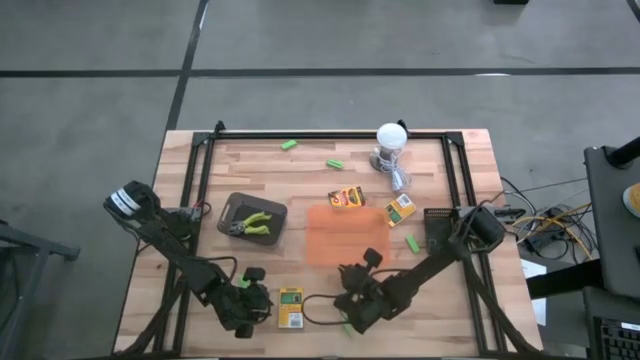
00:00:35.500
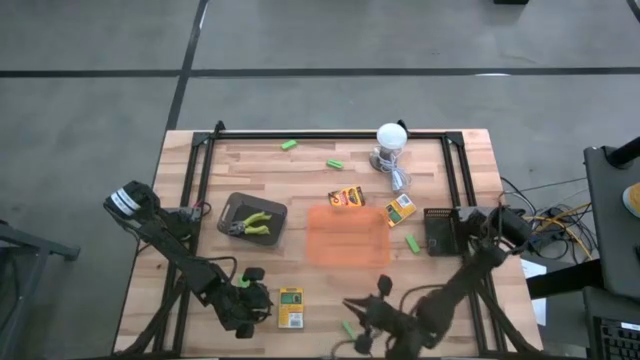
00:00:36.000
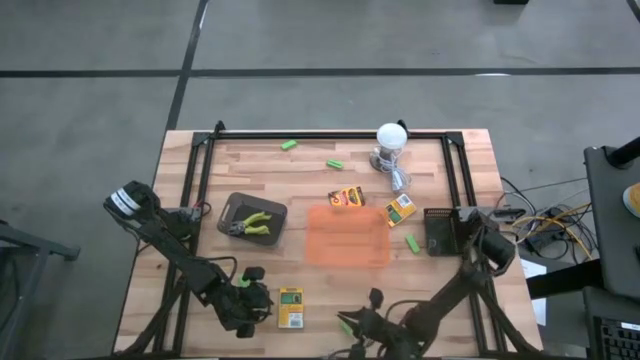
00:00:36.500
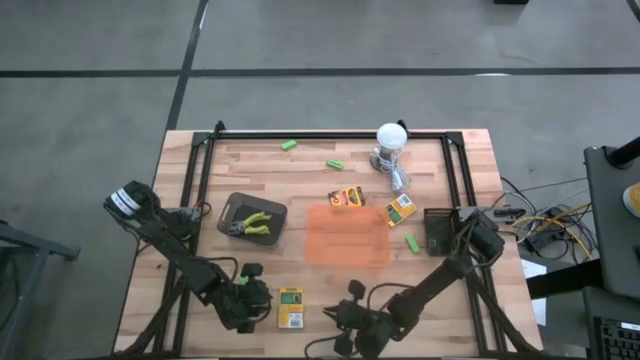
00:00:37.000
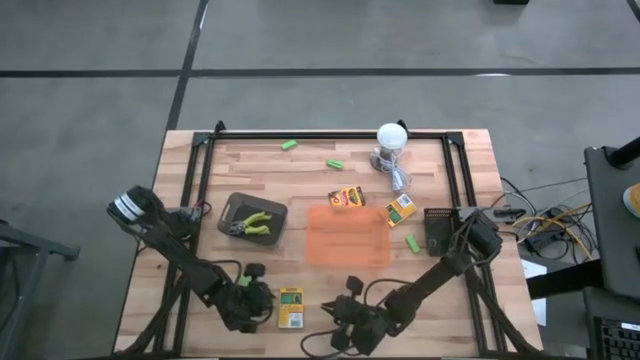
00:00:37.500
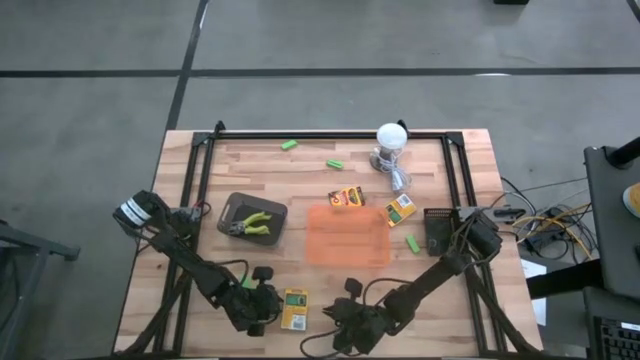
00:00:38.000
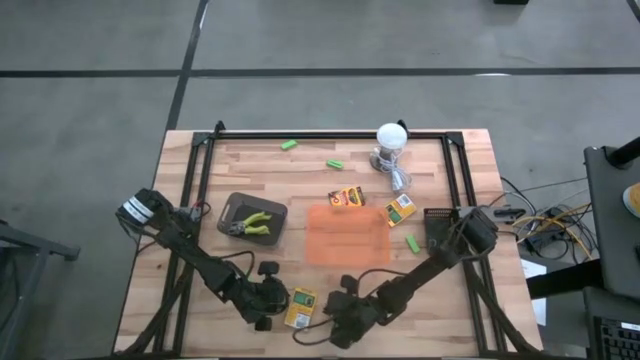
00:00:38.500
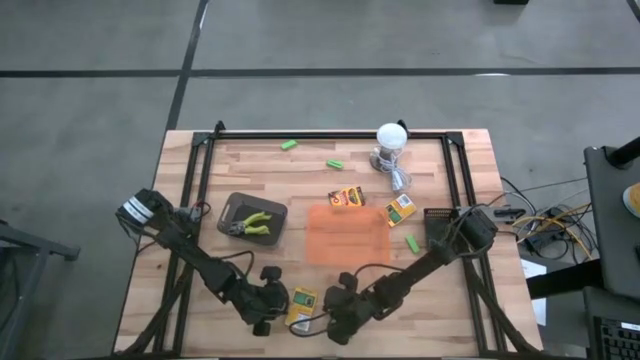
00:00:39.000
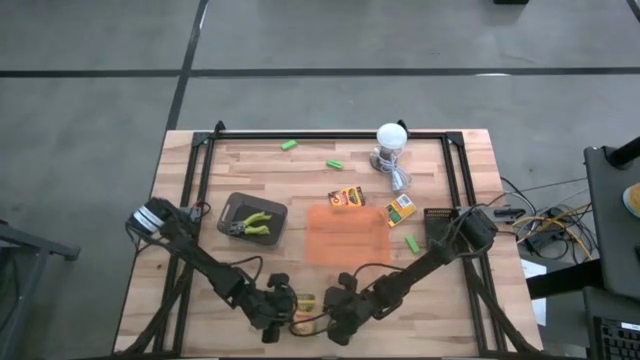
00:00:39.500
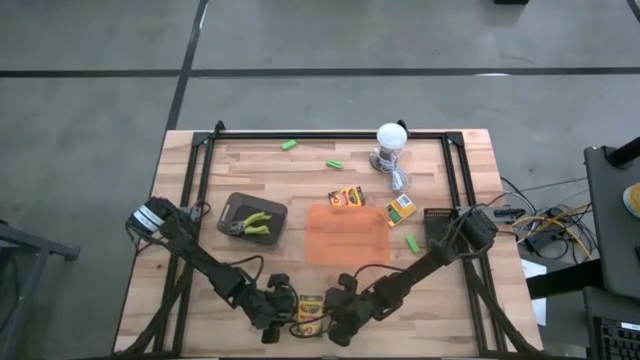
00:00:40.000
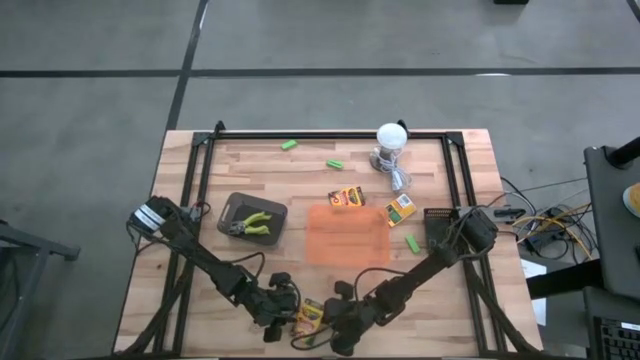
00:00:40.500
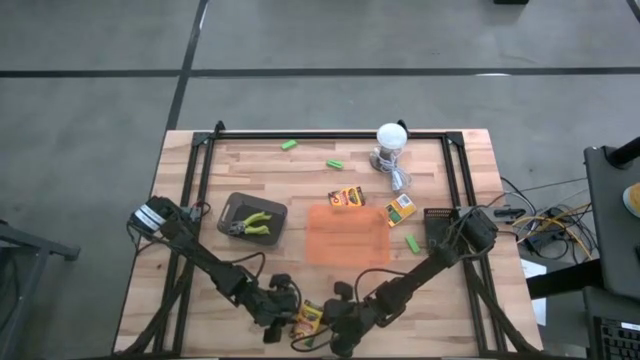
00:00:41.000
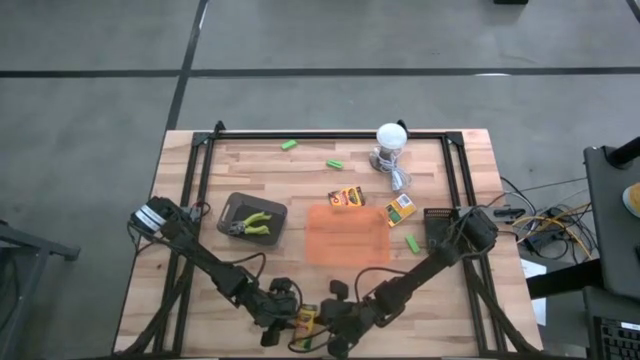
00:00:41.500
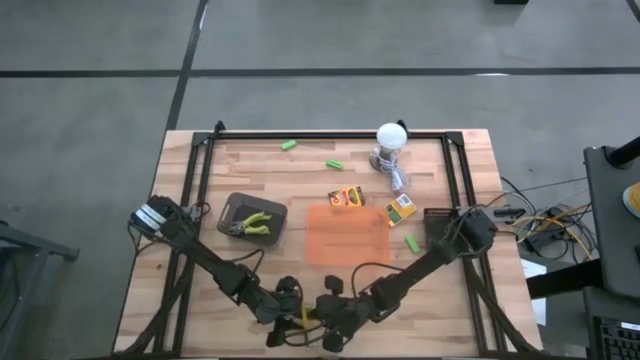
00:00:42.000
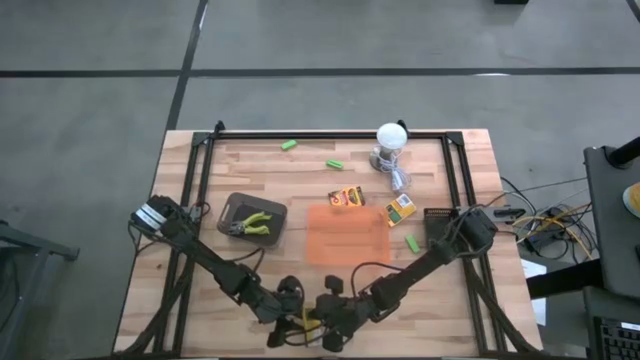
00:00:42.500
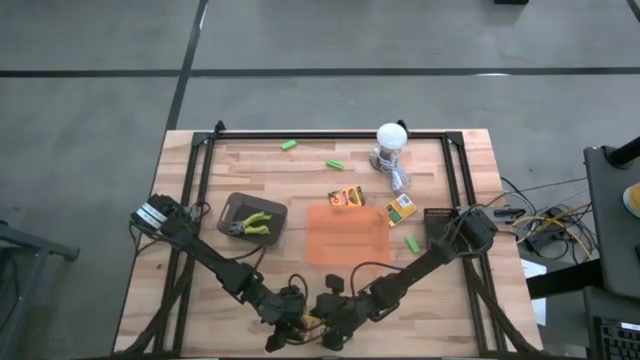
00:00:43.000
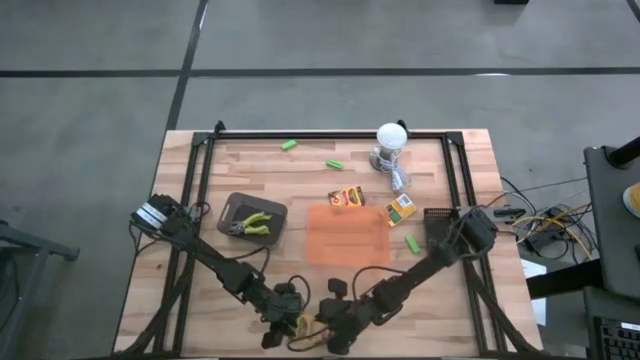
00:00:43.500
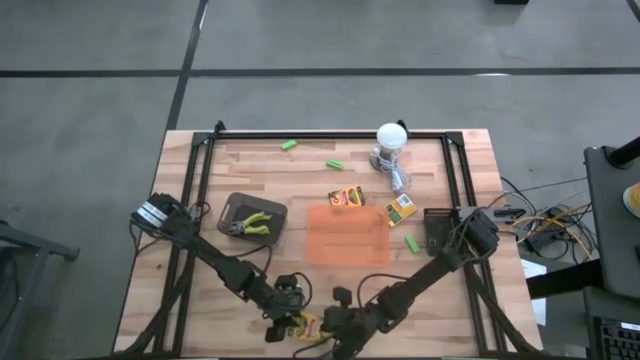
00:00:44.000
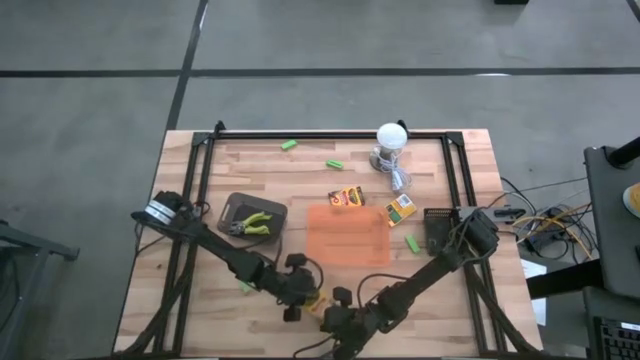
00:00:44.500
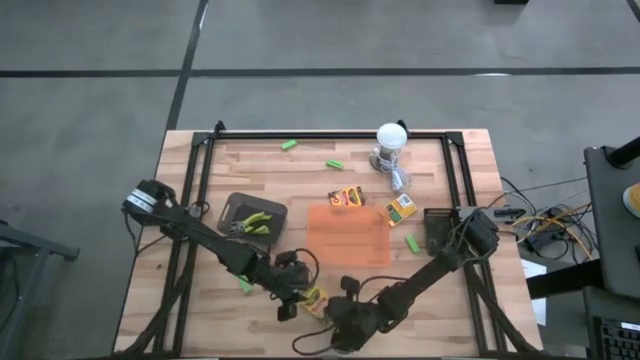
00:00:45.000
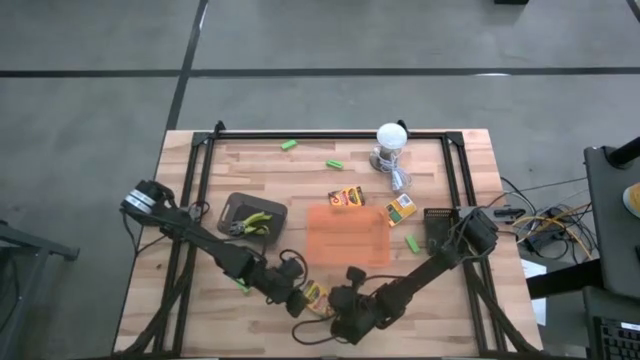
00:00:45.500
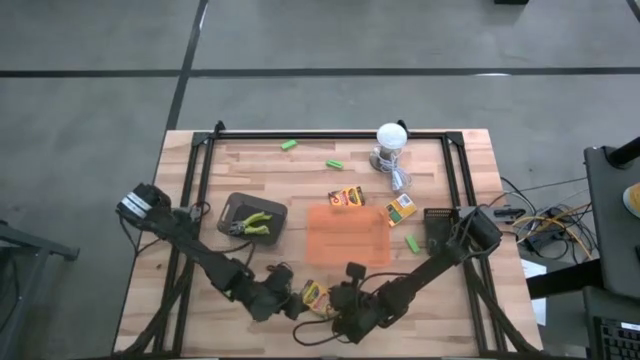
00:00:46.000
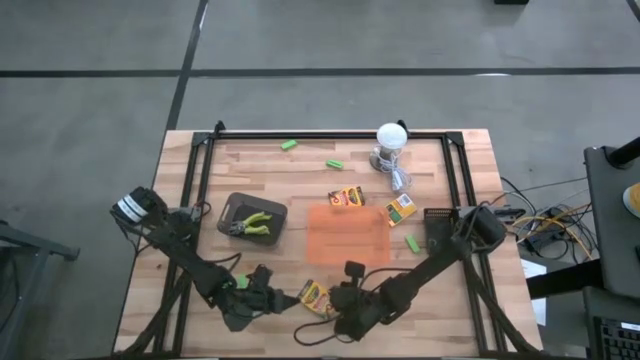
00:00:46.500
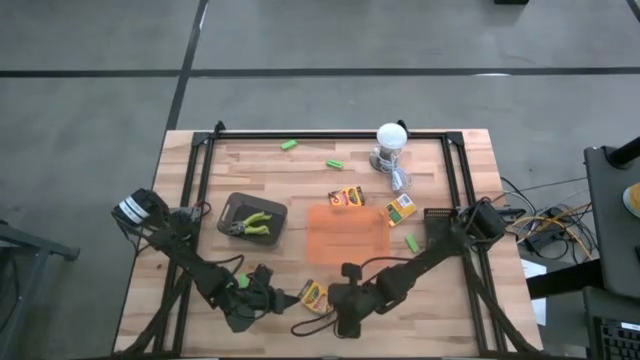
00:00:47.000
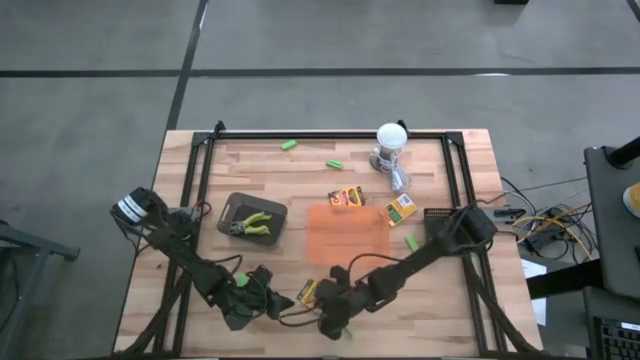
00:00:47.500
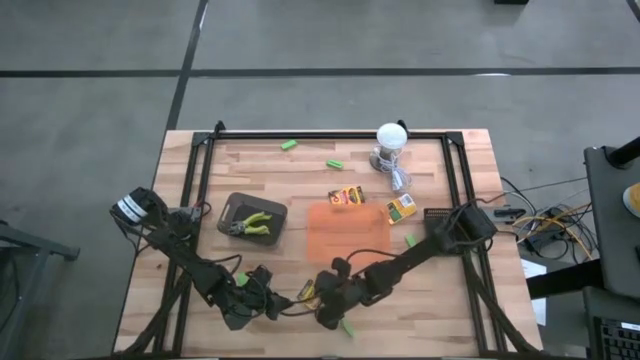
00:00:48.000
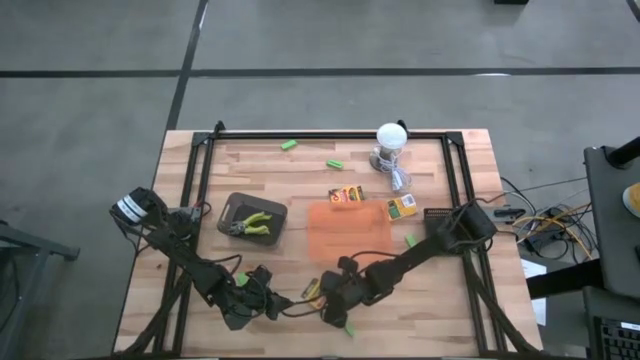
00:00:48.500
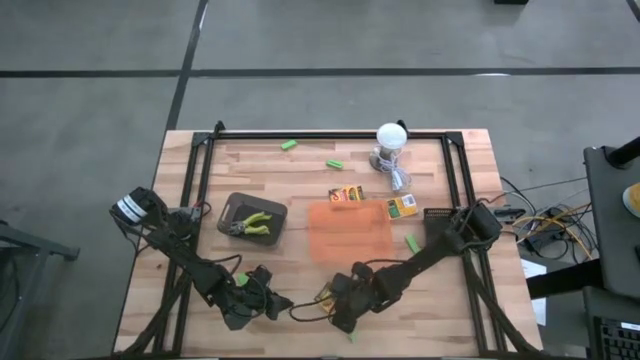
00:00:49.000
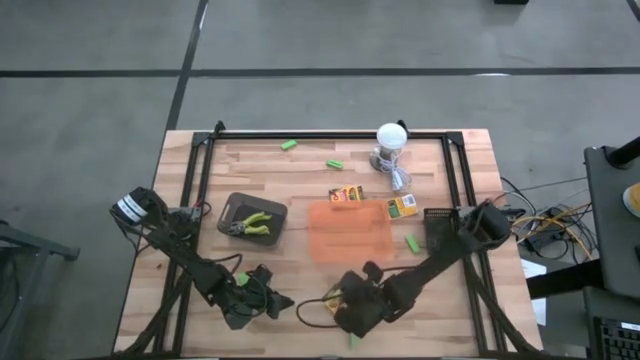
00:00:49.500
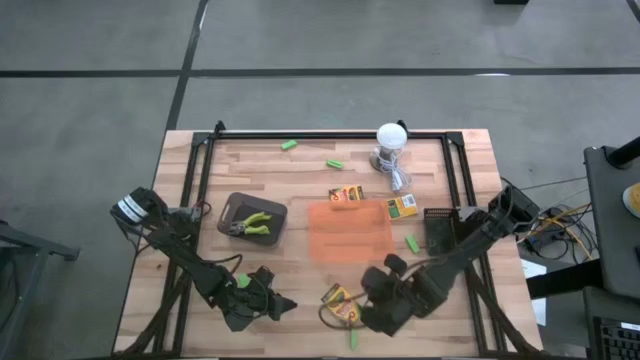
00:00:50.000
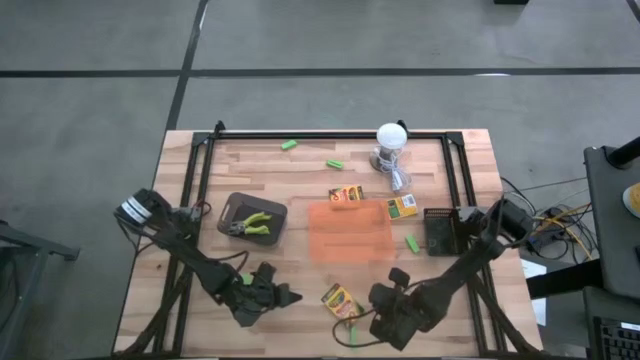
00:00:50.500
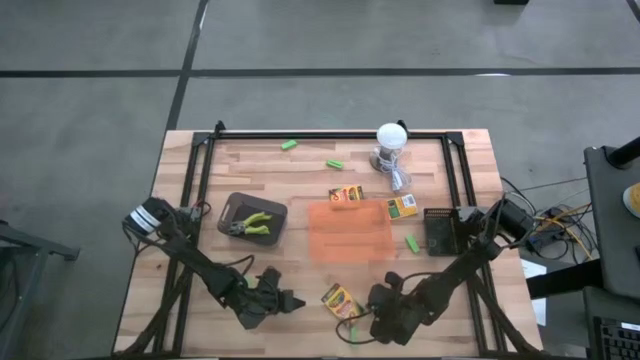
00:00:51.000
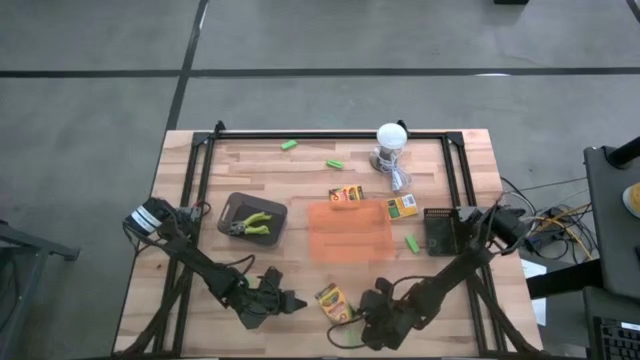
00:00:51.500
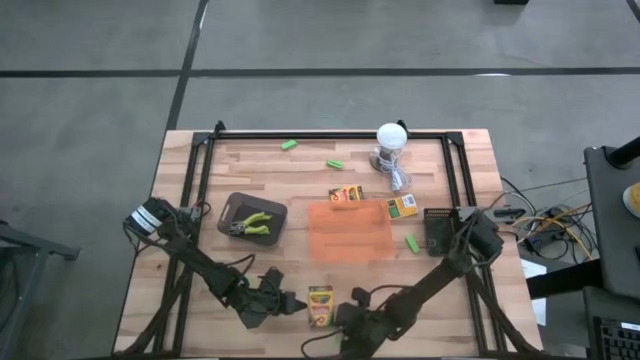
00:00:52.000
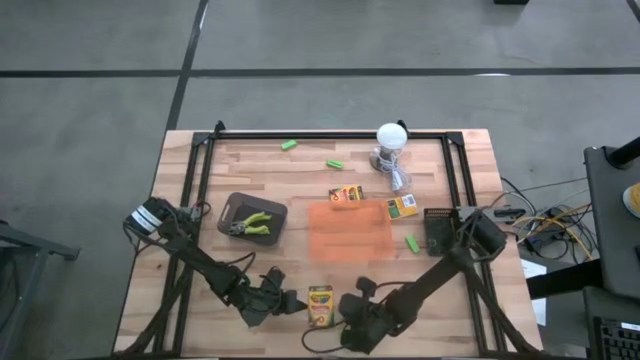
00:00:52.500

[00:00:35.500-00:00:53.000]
Task: Pick & Place School Supplies
Put the bottom crayon box into the orange bin

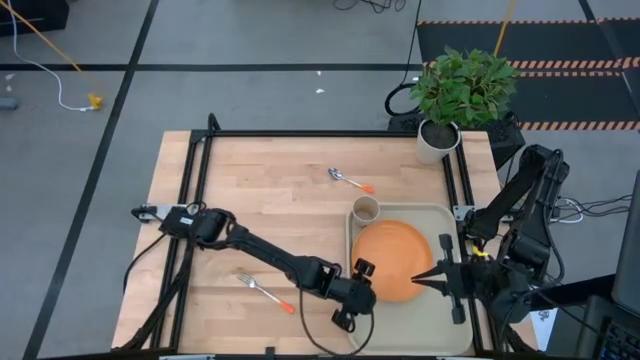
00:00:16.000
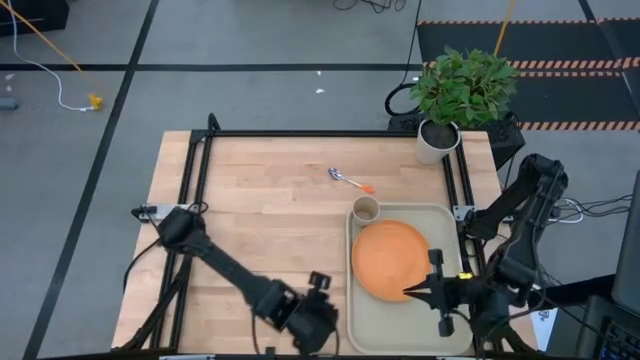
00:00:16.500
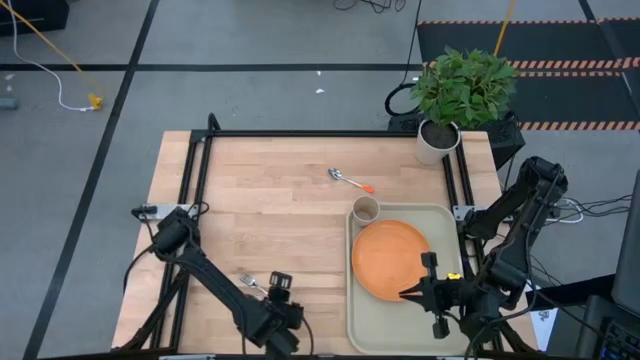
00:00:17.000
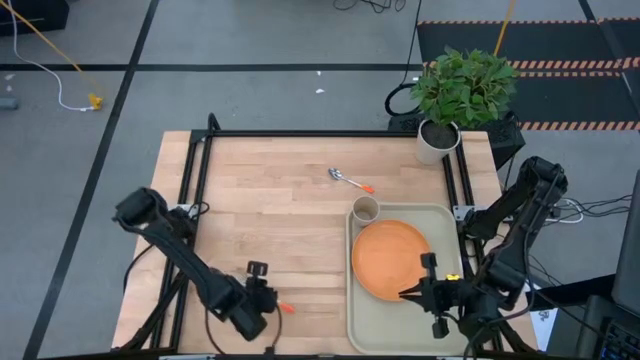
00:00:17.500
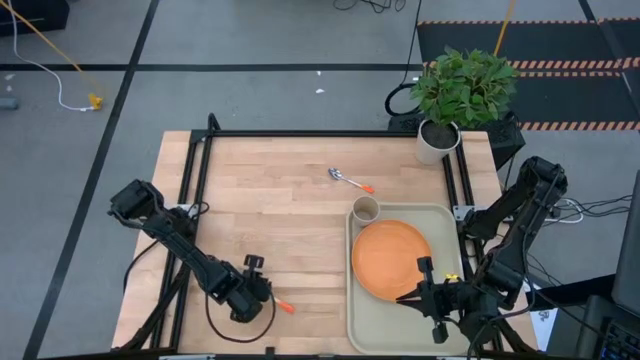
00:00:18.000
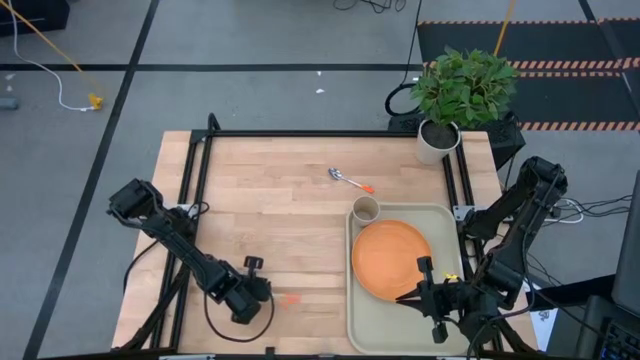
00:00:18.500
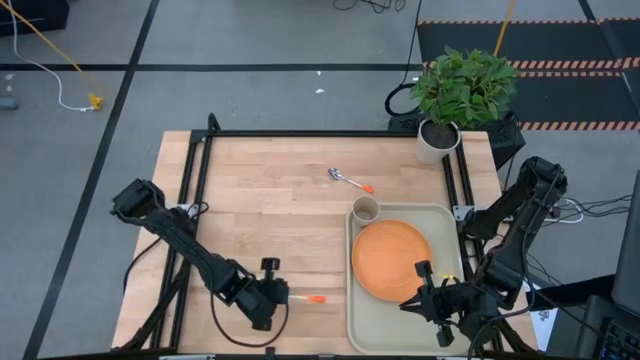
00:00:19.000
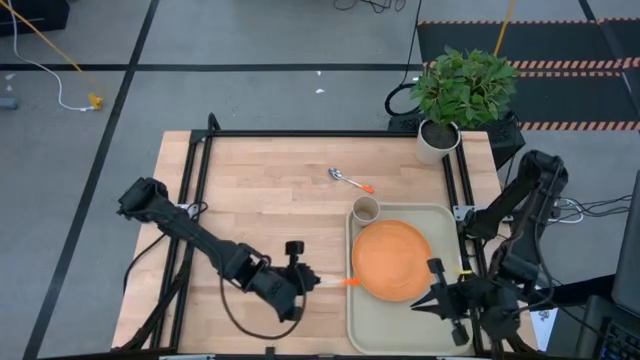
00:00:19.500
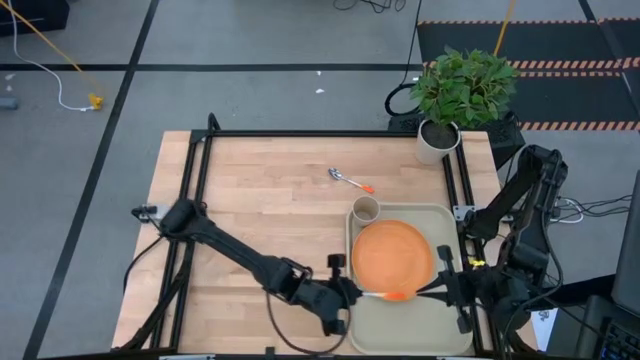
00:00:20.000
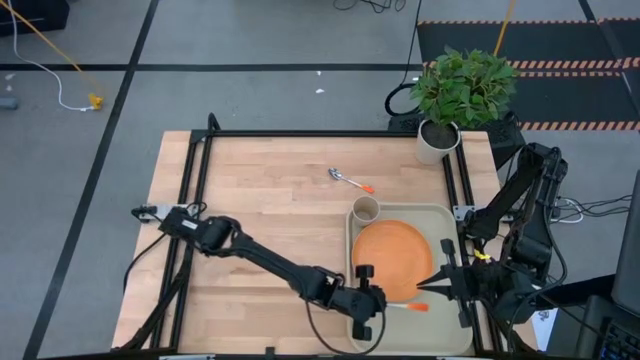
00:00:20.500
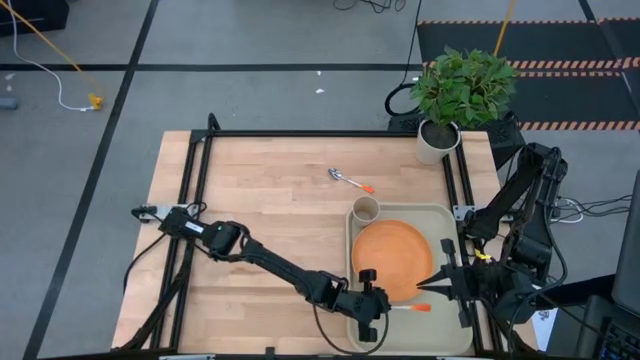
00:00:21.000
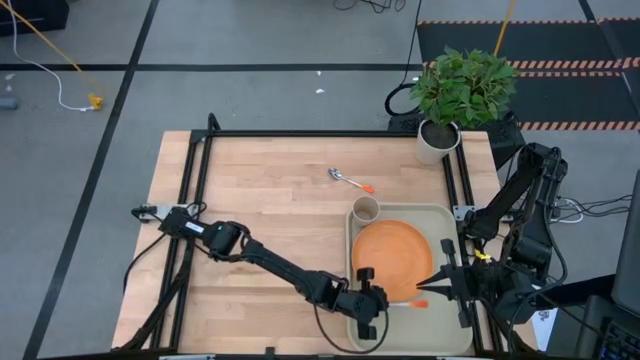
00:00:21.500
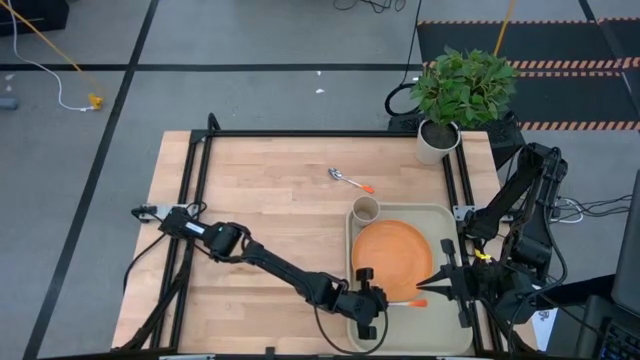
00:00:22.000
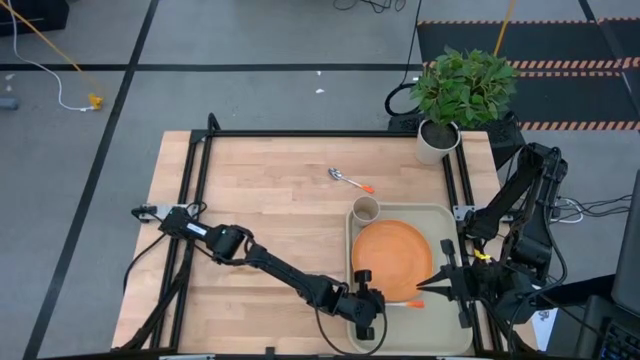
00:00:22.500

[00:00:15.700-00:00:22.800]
Task: Pick and place plate/cup/fork/spoon on tray
Put the white orange fork on the left side of the orange plate
